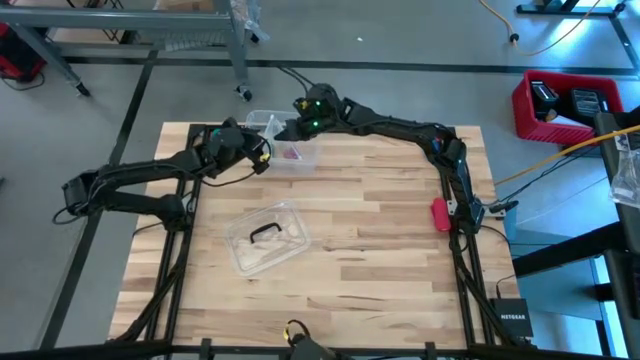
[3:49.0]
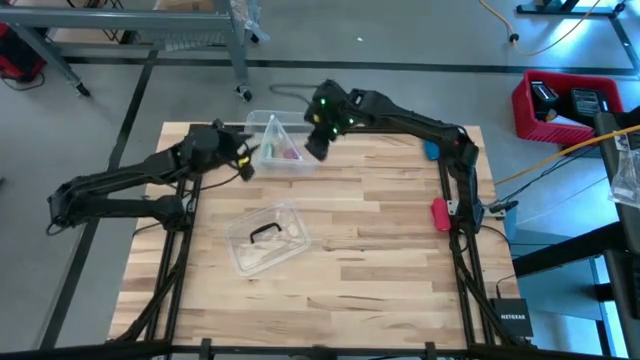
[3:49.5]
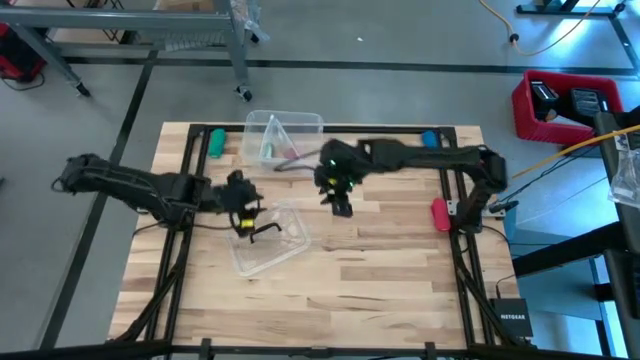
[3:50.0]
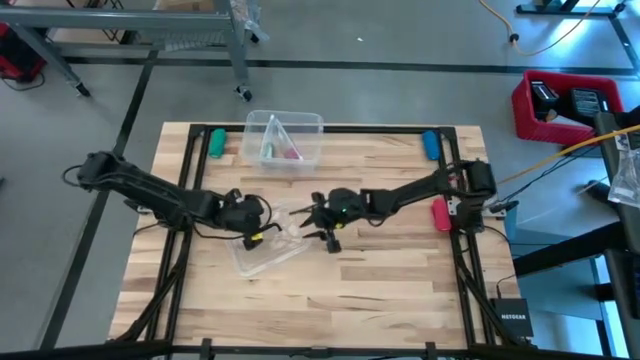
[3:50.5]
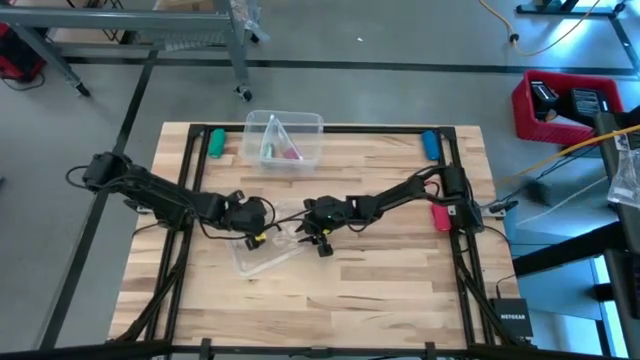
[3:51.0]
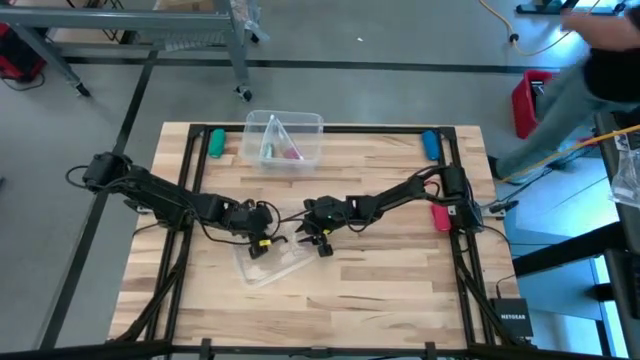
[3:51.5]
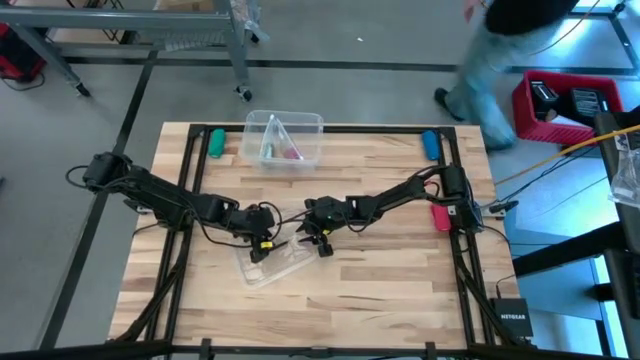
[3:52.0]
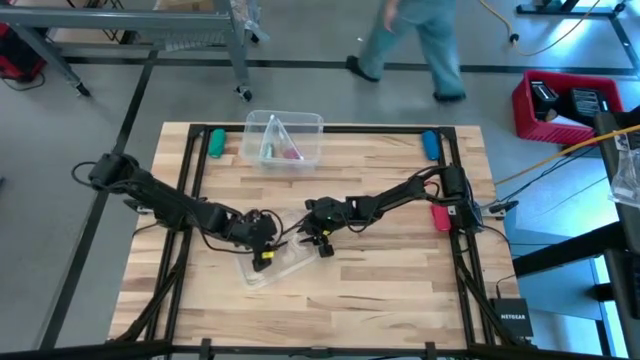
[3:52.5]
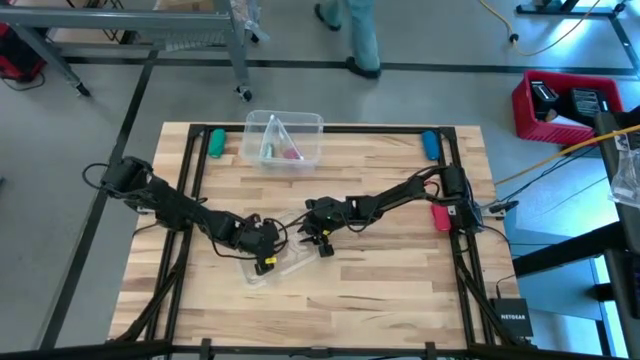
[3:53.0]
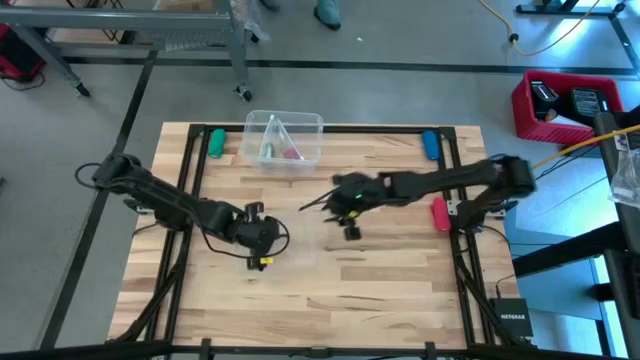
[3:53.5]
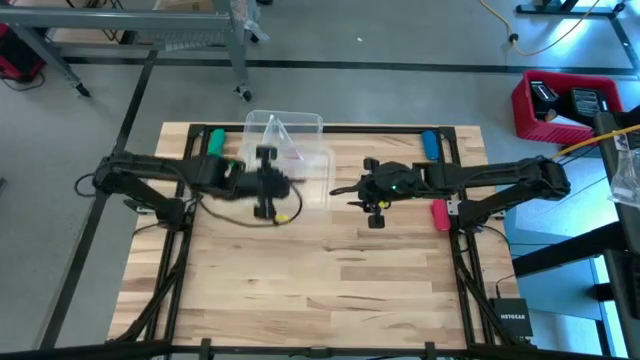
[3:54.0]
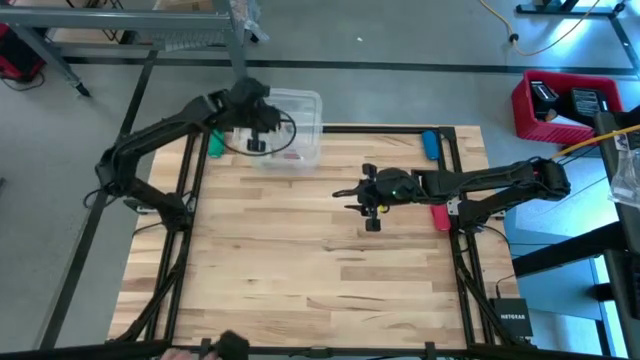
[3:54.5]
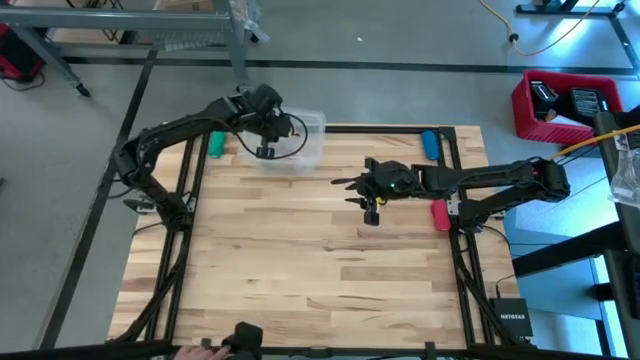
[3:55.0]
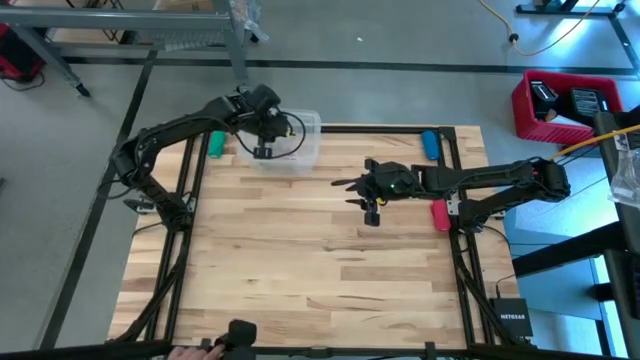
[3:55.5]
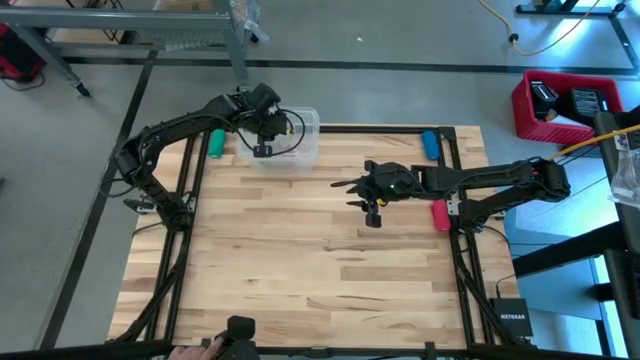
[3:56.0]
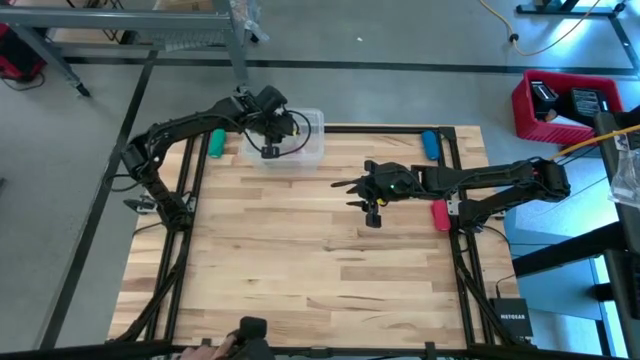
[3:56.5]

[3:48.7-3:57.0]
Task: Roll bandage
Close the cover of the container

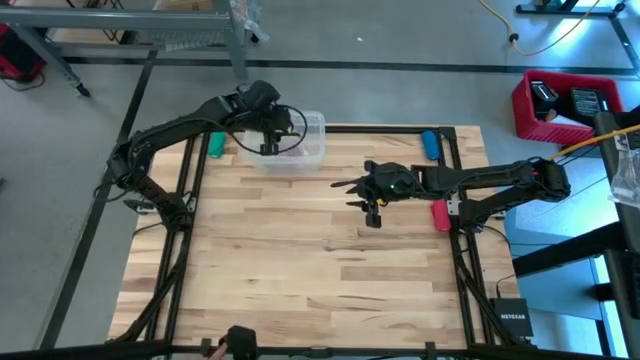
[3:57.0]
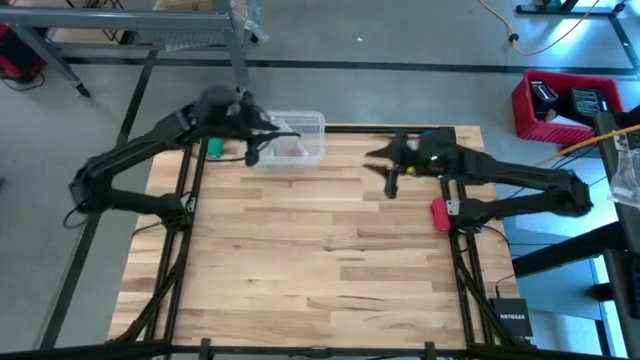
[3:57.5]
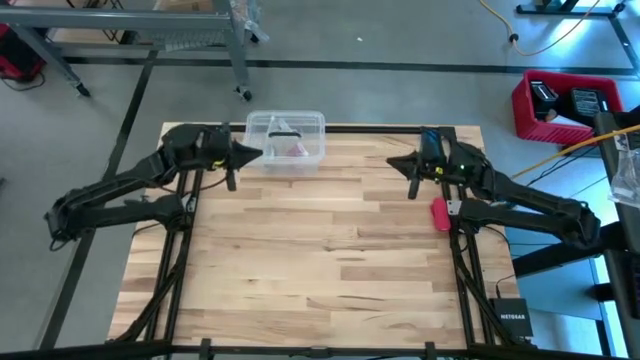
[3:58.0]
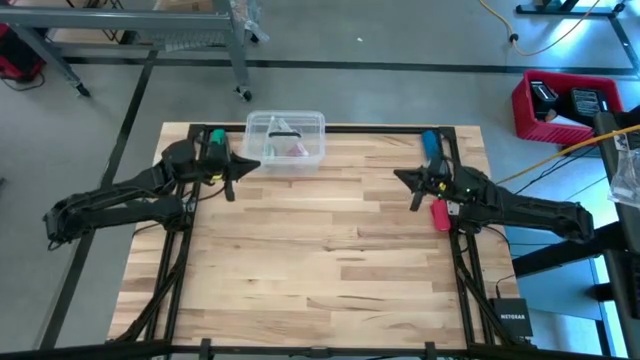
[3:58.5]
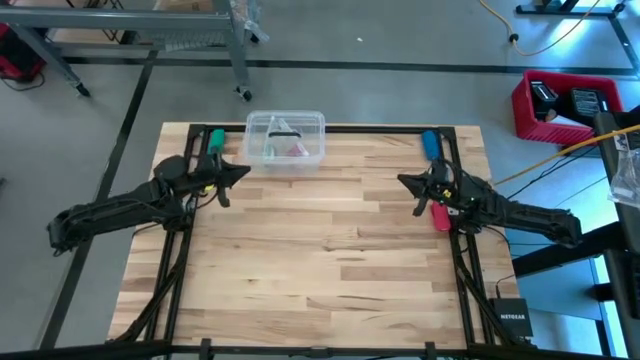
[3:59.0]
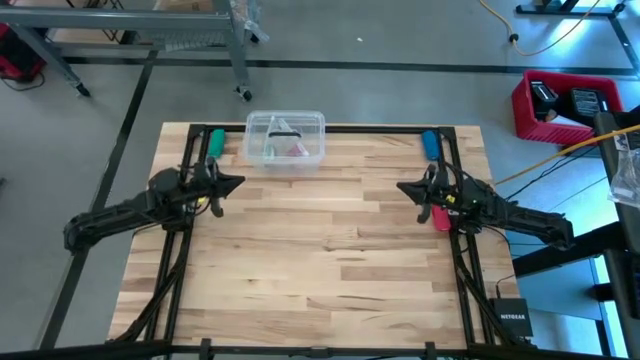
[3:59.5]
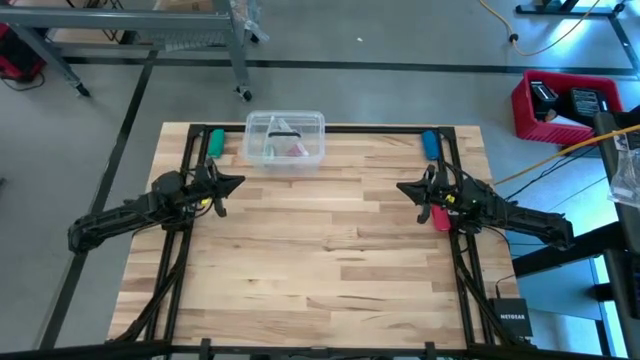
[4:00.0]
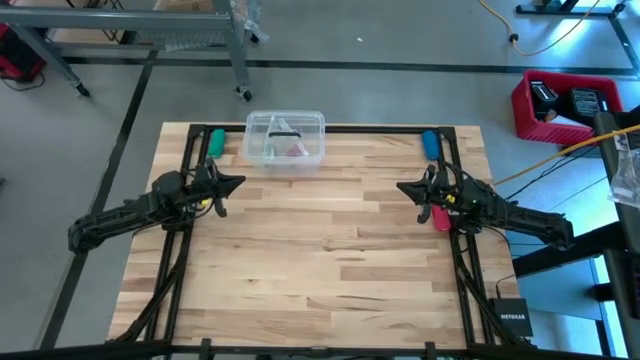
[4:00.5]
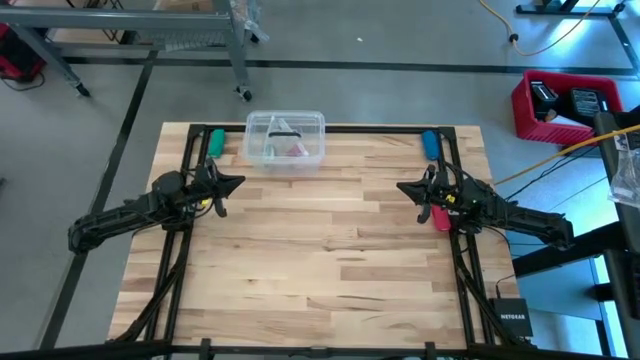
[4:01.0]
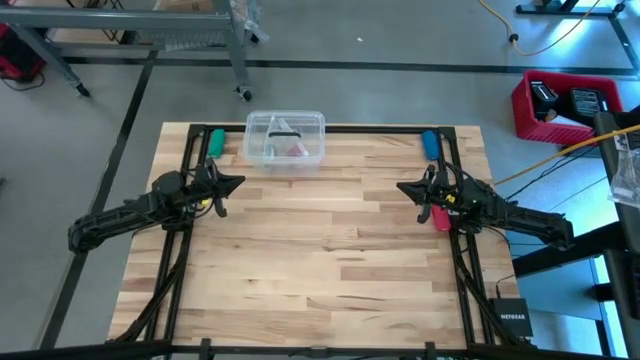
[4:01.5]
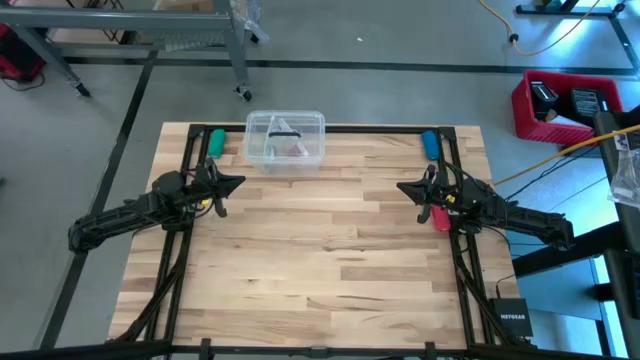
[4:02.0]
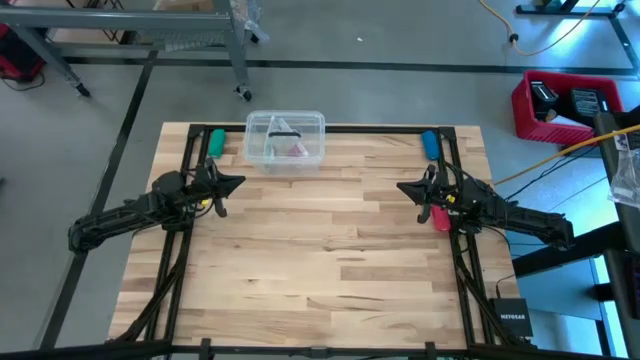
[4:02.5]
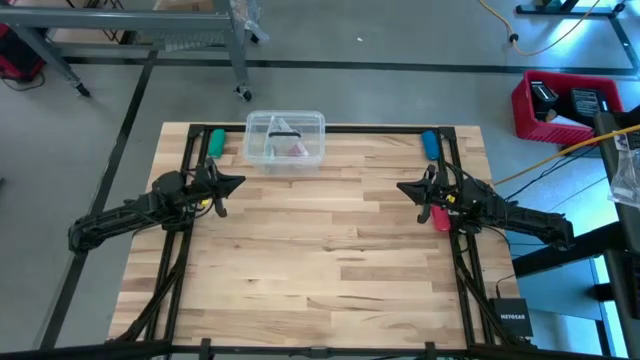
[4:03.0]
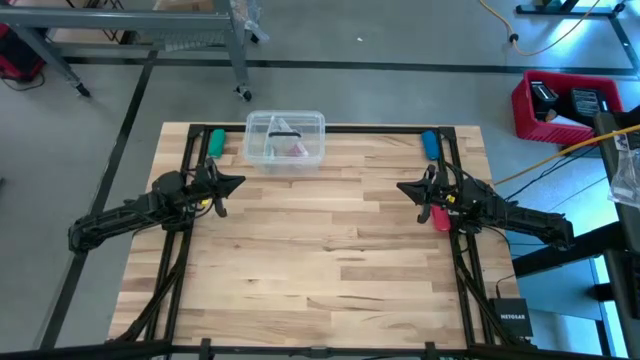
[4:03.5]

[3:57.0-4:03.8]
Return to Home Position

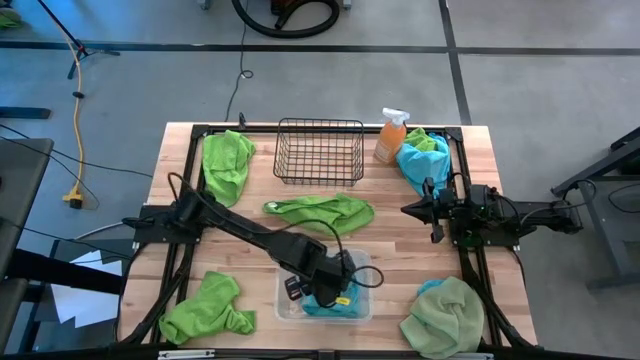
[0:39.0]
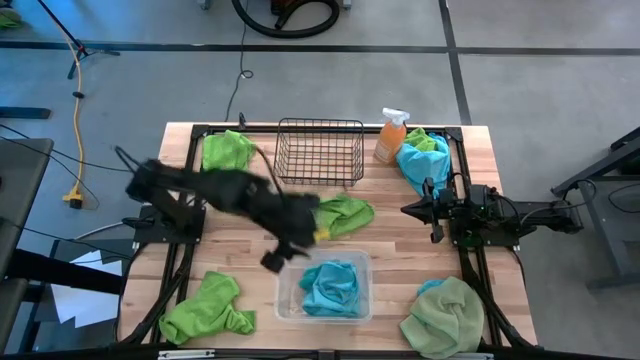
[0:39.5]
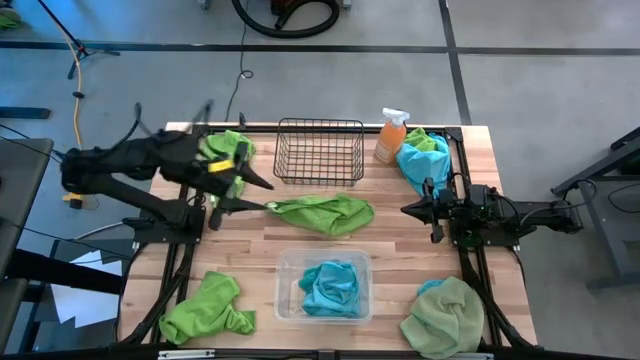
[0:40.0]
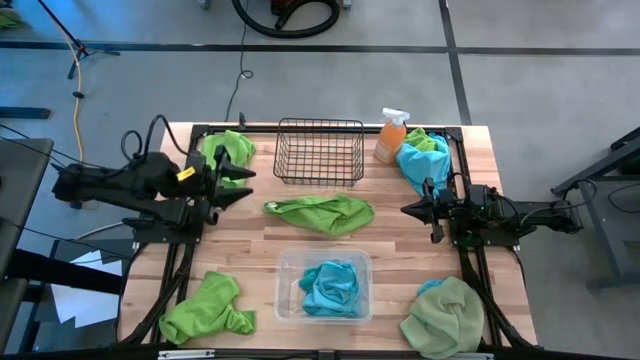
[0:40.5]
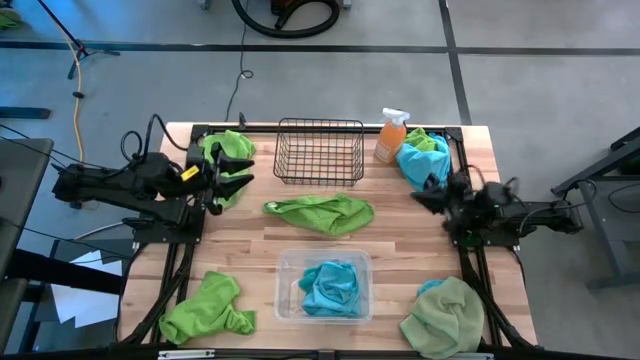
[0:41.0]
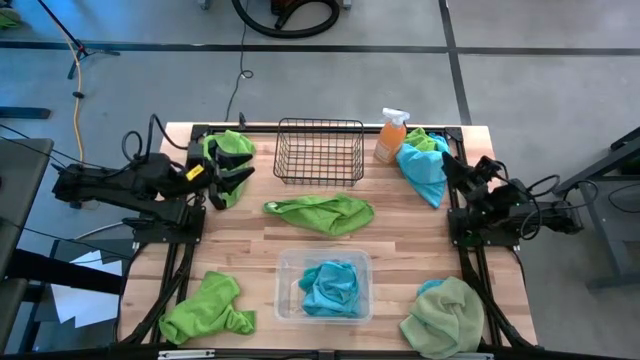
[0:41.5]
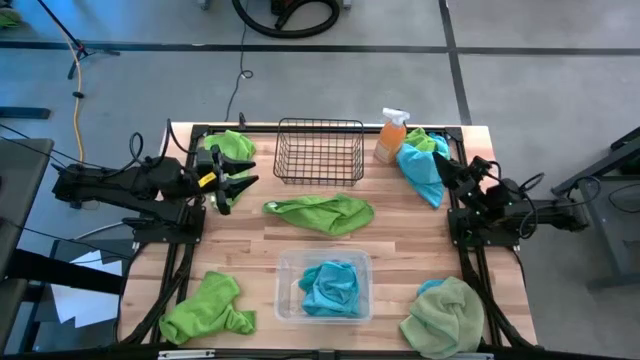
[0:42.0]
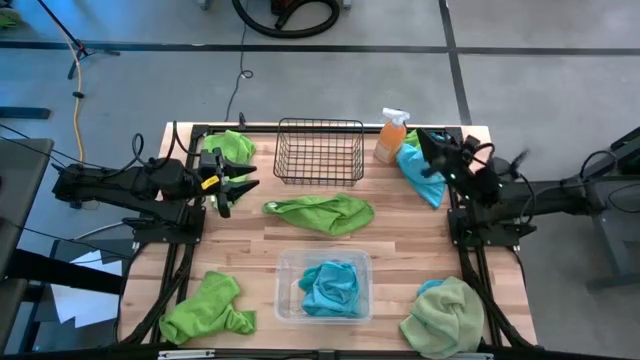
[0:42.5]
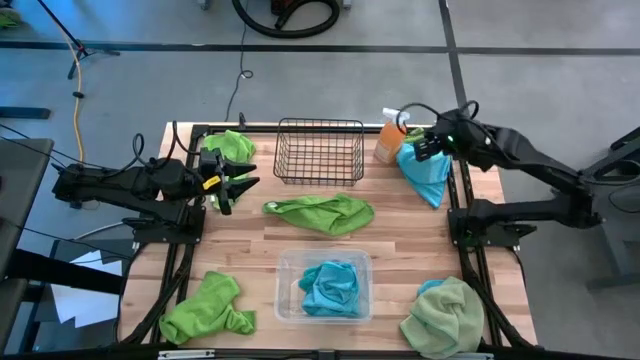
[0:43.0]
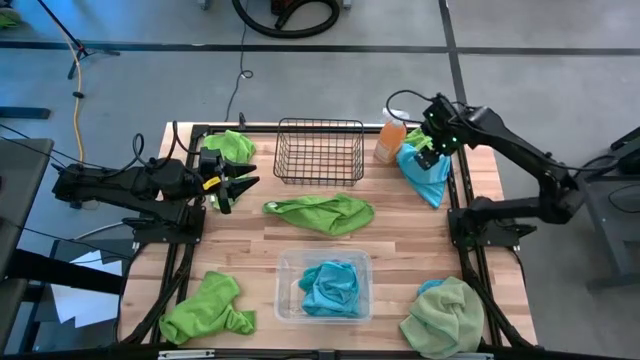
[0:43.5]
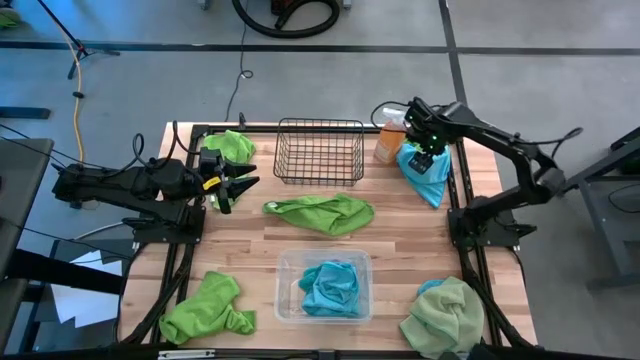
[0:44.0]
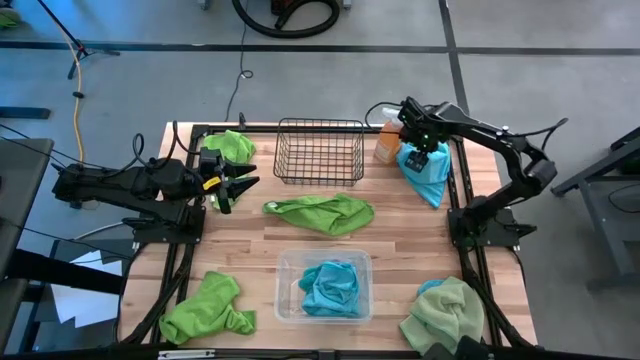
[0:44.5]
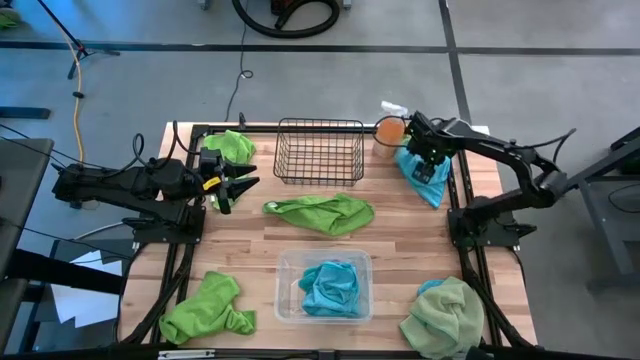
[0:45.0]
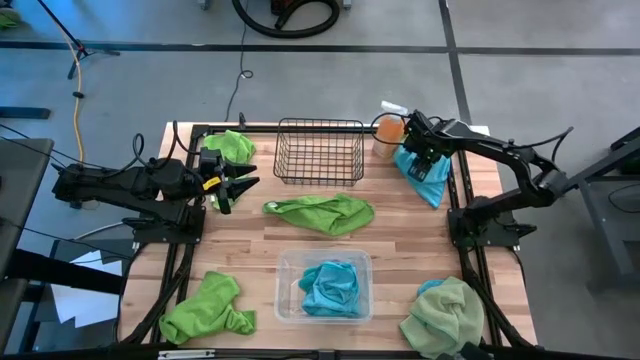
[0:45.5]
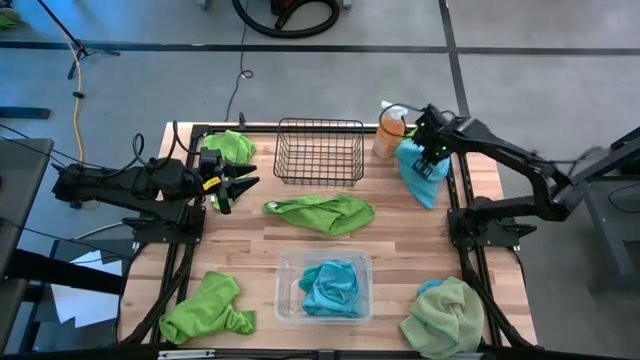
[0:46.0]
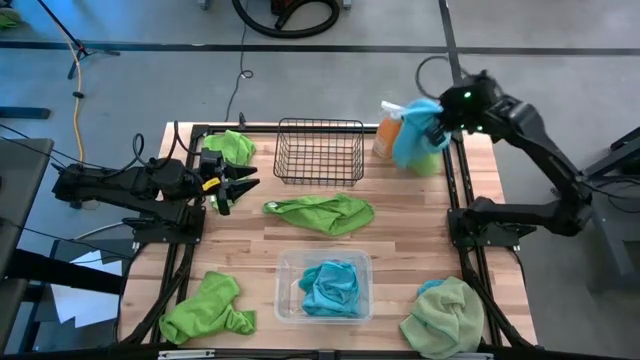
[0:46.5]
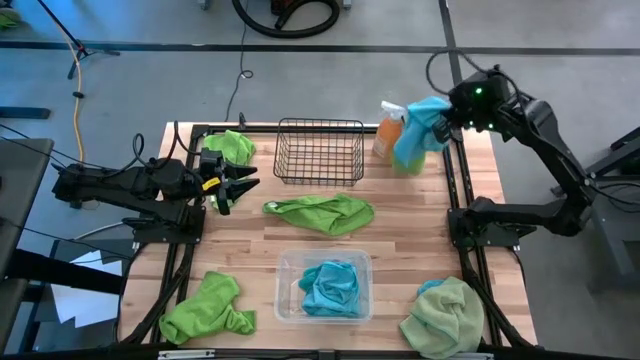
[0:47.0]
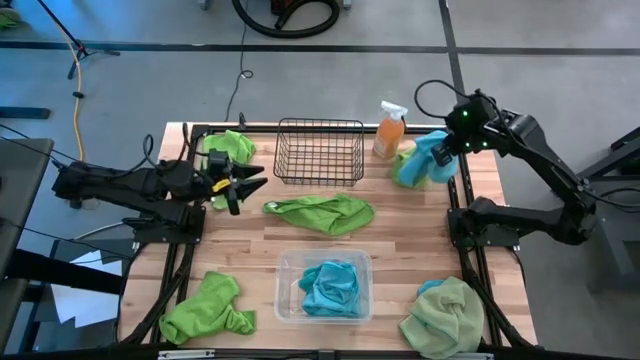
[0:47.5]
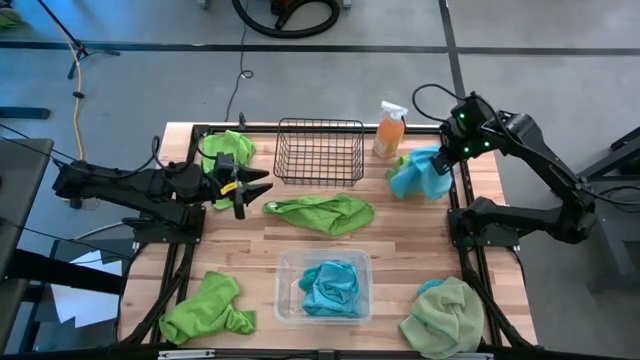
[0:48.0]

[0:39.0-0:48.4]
Task: Sort microfiber towel by color & place in baskets
Put the top blue towel into the transparent bin
